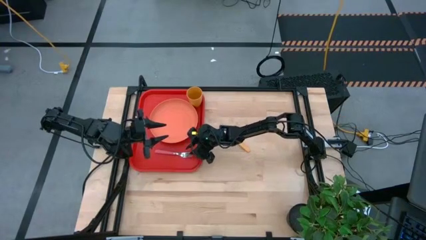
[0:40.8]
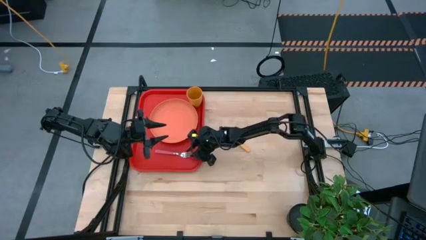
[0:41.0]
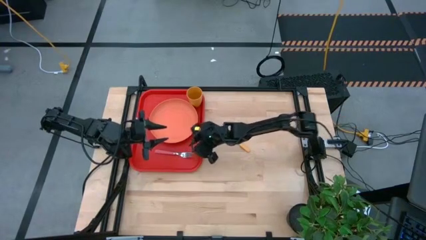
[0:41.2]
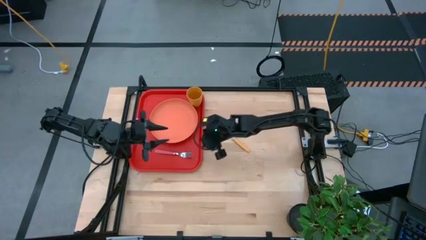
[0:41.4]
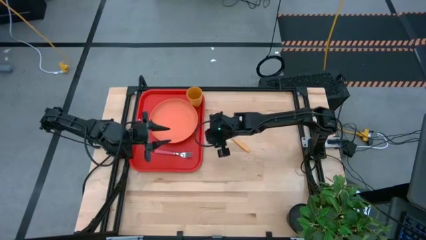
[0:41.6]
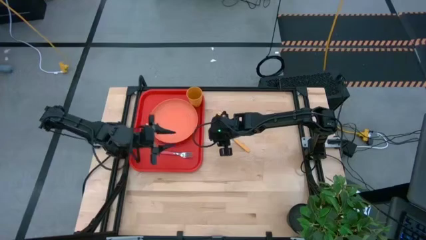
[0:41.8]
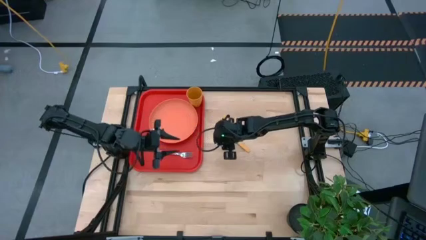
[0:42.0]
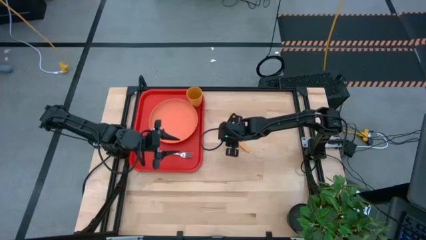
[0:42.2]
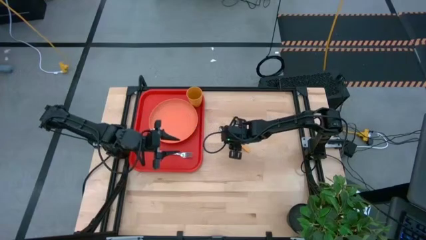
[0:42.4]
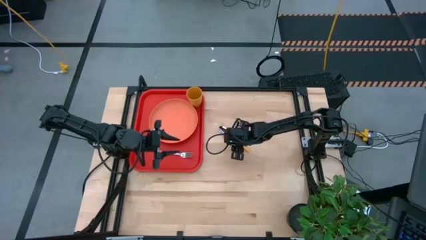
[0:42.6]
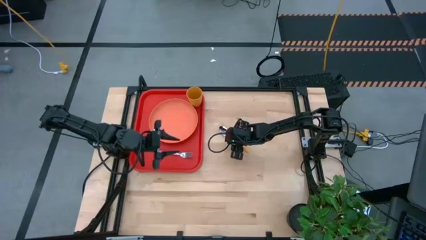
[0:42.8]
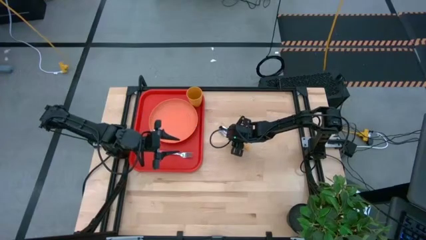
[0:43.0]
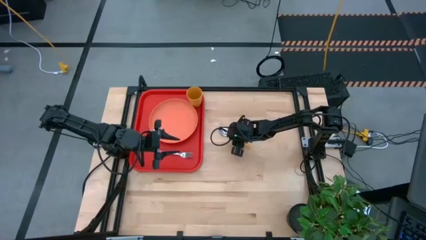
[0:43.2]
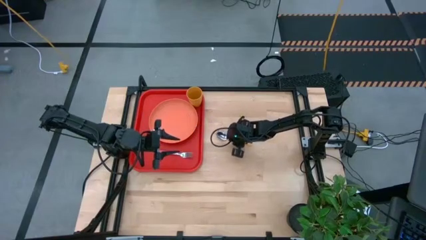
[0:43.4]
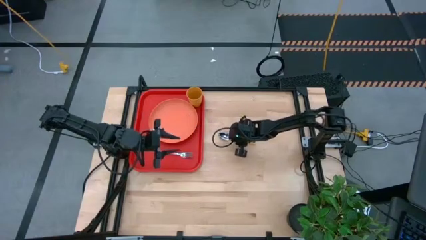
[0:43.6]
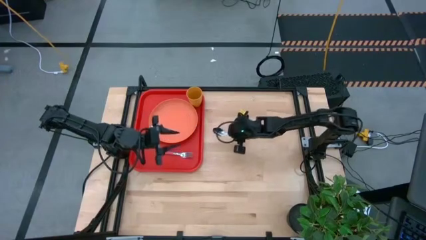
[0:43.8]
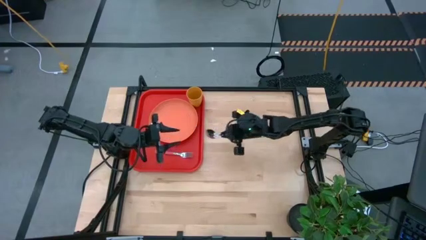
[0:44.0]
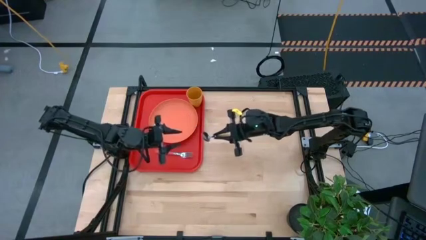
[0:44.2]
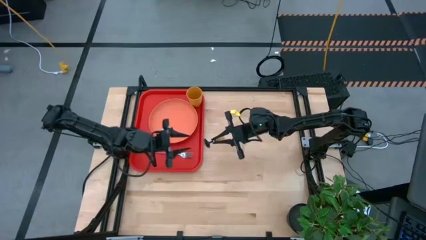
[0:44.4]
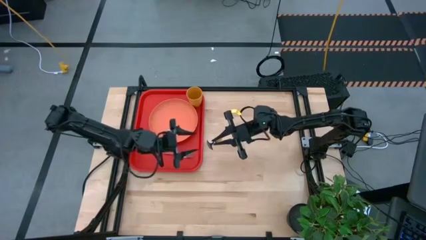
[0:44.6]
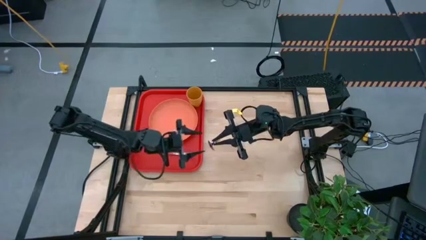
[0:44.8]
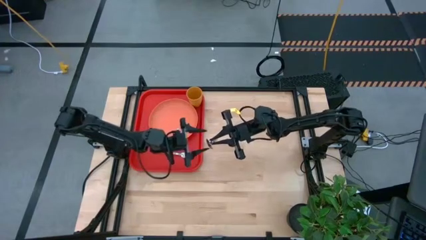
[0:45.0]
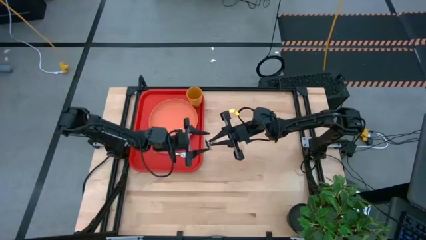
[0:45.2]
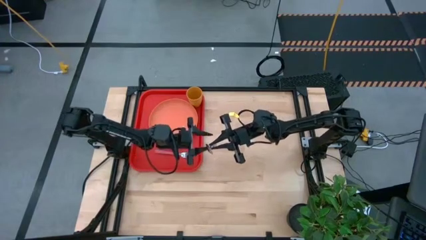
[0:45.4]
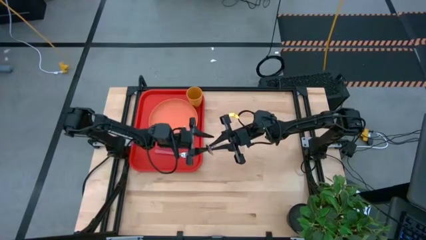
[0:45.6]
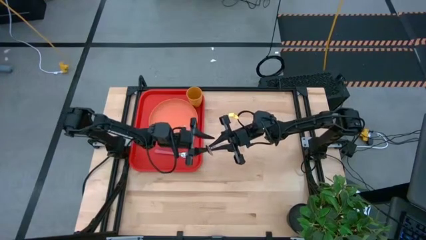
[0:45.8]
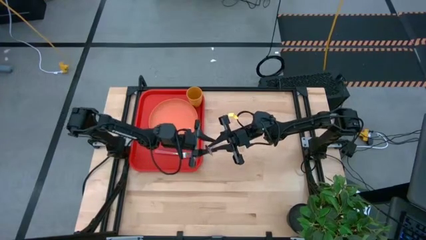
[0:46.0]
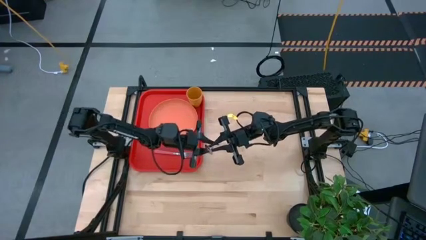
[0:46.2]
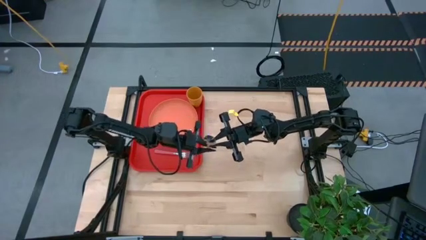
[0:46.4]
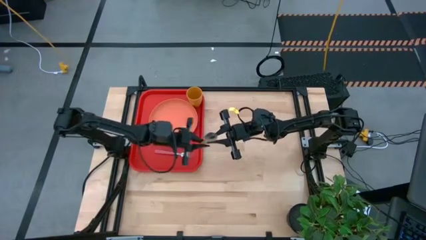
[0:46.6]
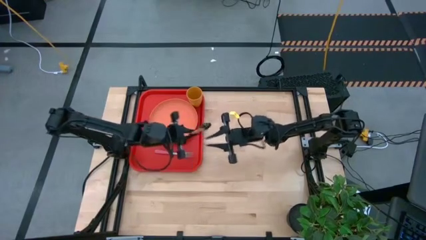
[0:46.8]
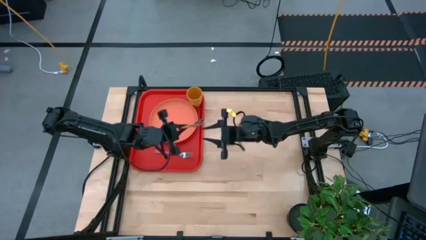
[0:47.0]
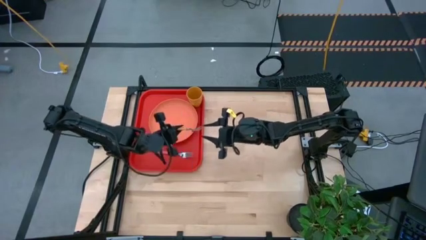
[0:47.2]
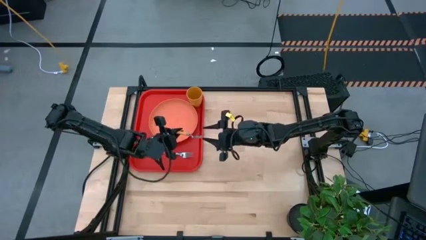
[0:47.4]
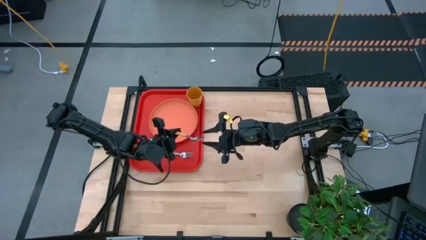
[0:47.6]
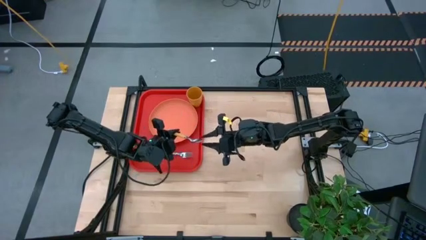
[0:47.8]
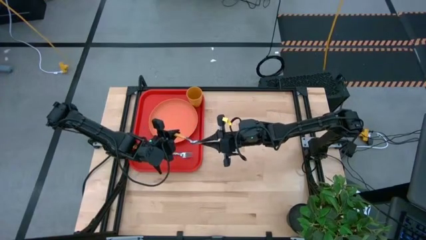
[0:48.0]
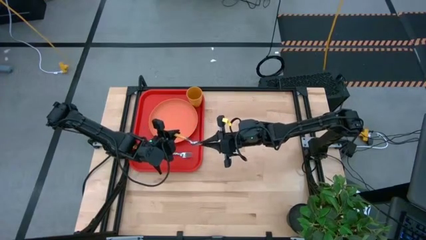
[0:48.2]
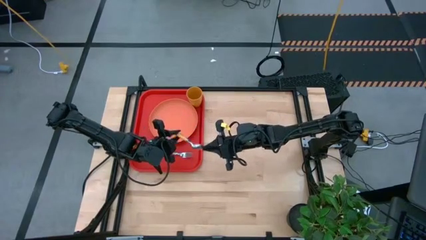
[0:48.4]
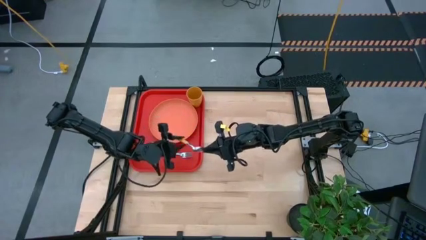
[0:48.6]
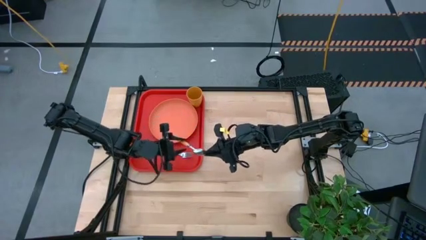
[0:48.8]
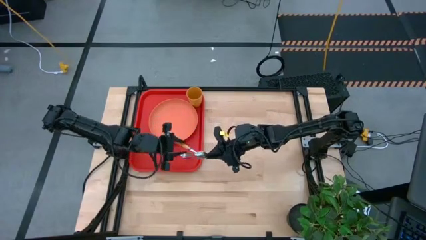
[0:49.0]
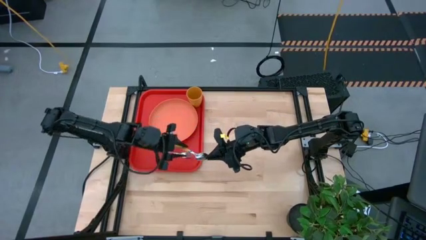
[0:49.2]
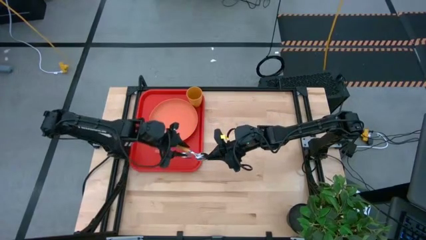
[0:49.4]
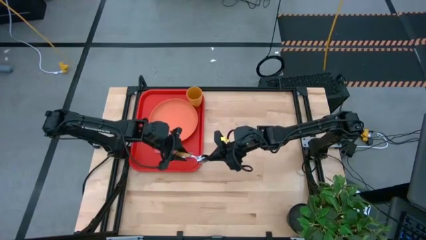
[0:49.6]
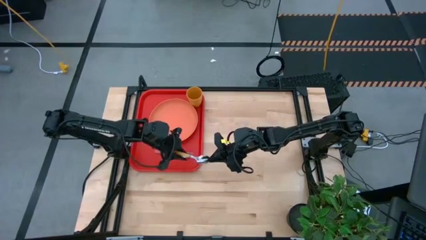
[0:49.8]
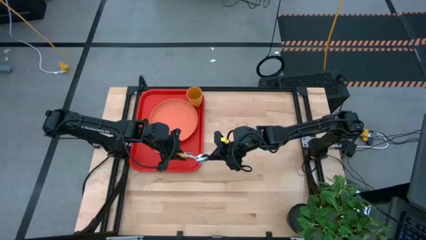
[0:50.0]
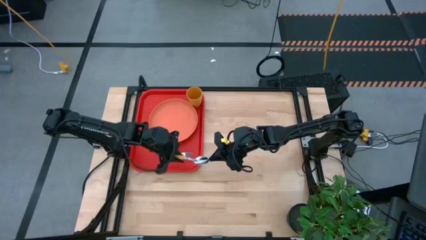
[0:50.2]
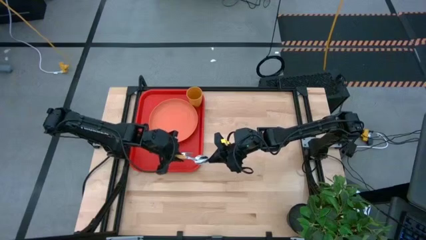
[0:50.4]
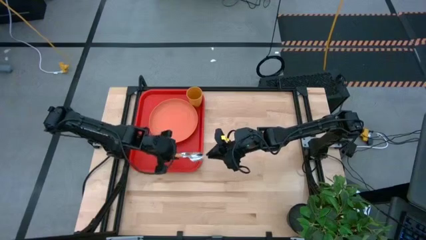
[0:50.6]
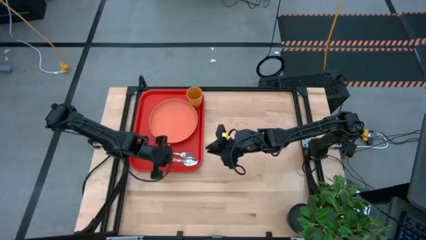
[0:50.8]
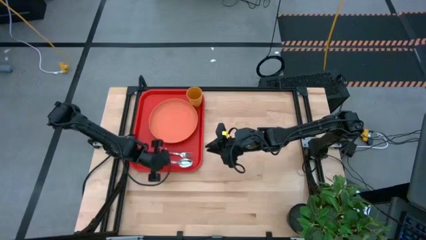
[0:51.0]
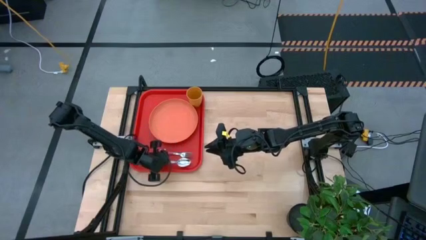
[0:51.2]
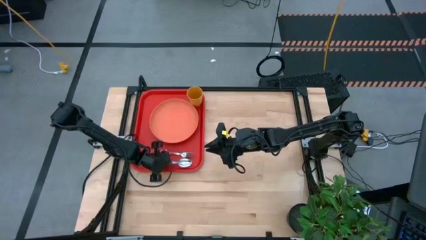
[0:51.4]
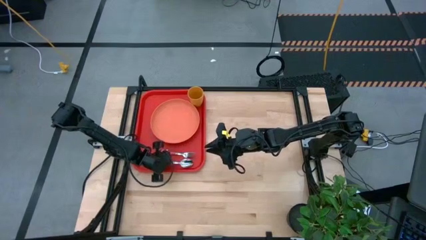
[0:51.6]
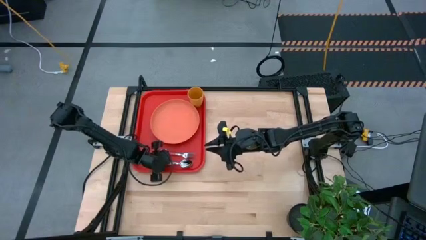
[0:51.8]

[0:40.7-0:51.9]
Task: Pick and place plate/cup/fork/spoon on tray
Put the yellow spoon on the red serving tray at the bottom of the pink fork
